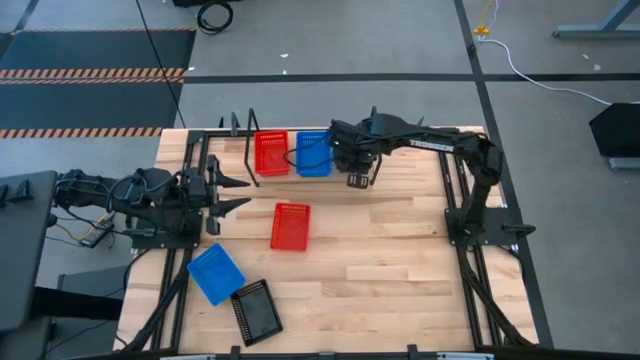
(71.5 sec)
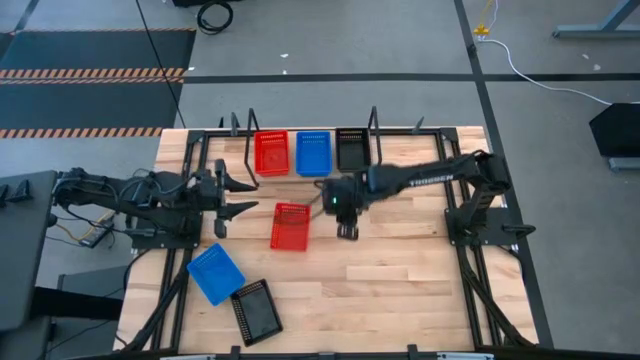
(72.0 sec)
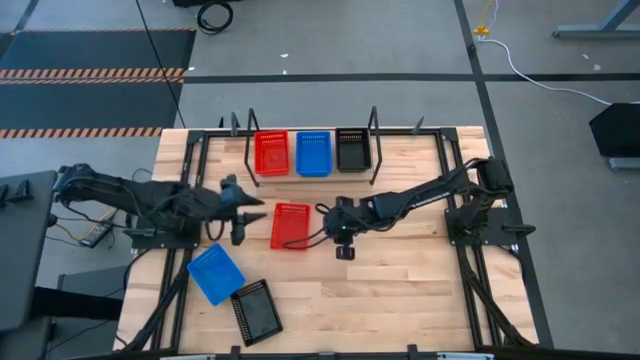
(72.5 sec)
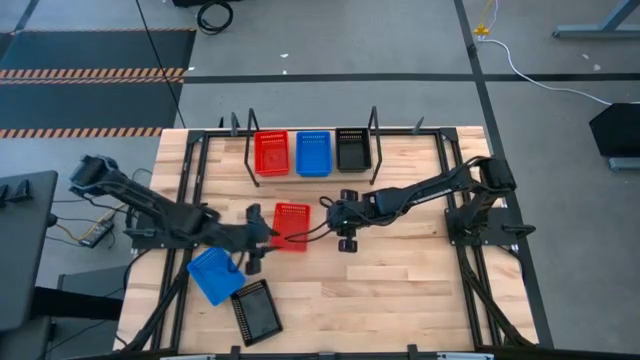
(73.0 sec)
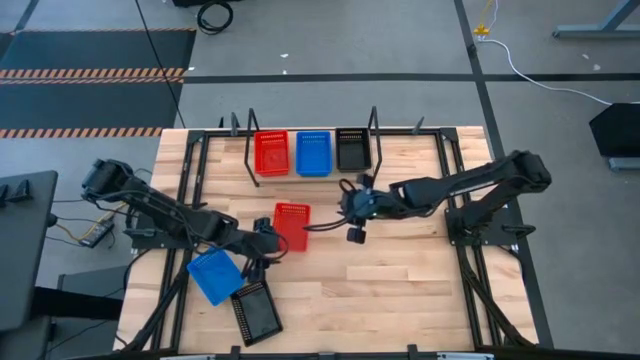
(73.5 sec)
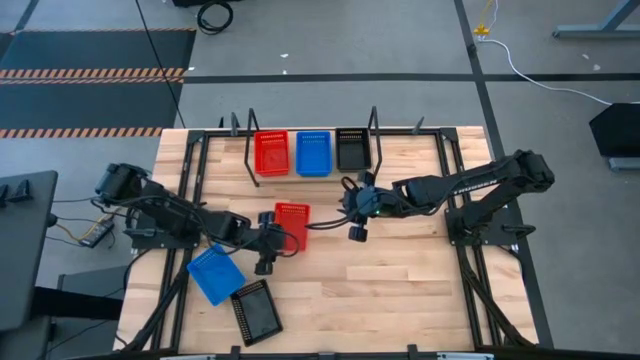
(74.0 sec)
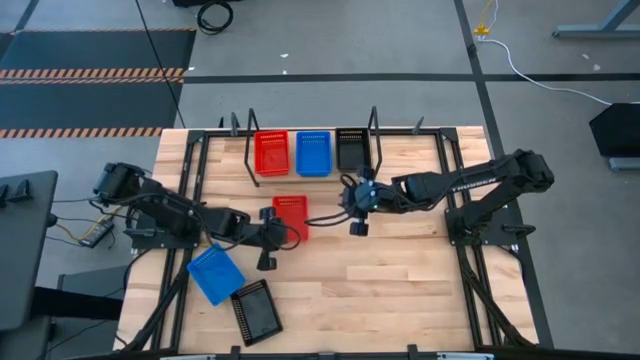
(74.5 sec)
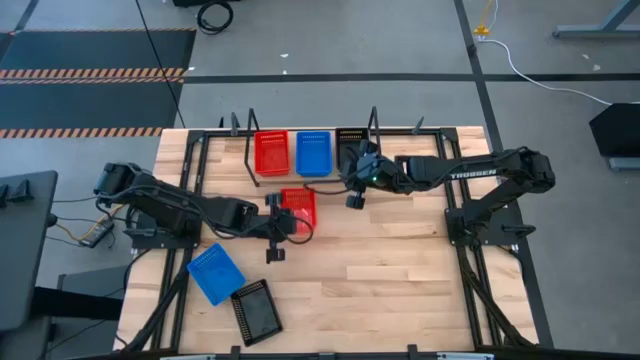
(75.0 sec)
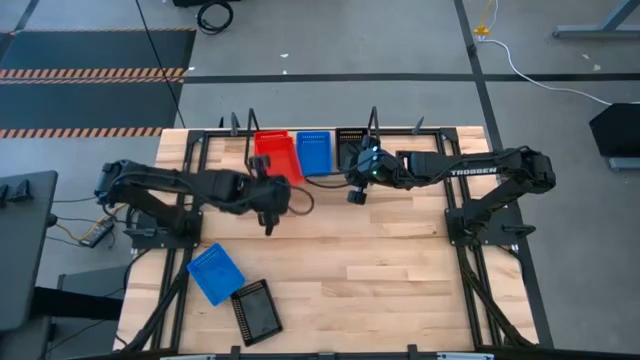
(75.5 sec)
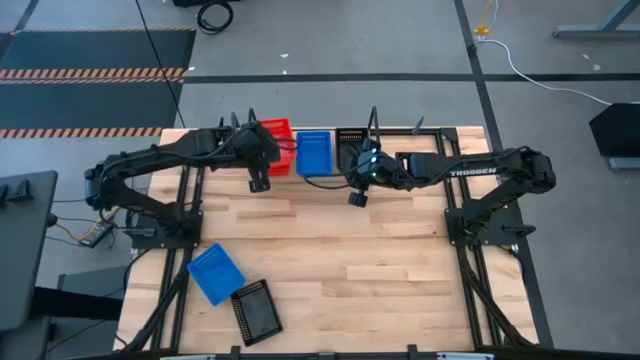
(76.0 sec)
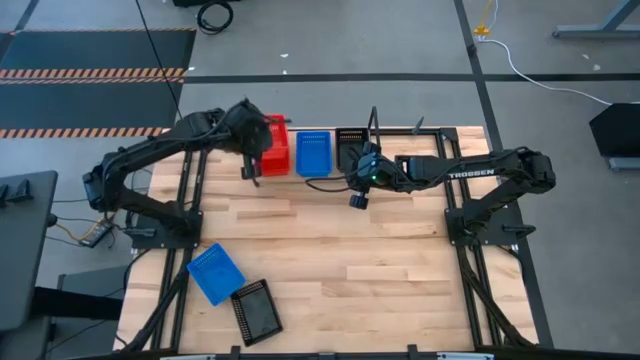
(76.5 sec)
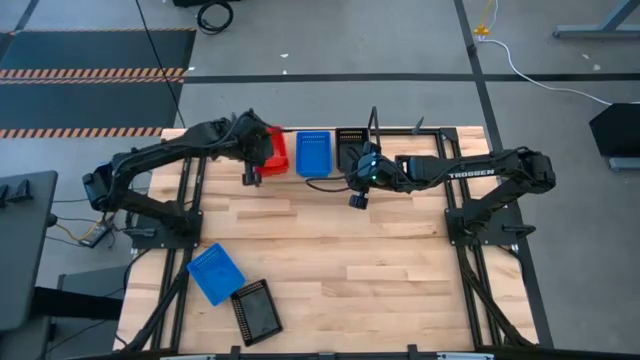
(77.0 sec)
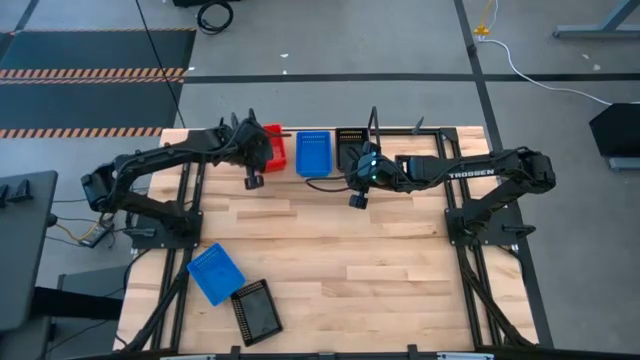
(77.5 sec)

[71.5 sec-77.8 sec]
Task: Stack baskets on shelf by color
Stack the red bin on top of the red bin on the shelf

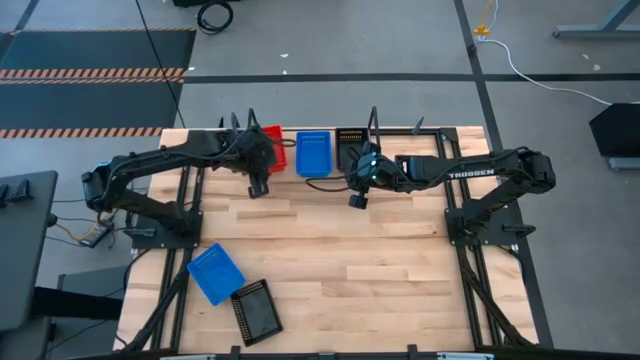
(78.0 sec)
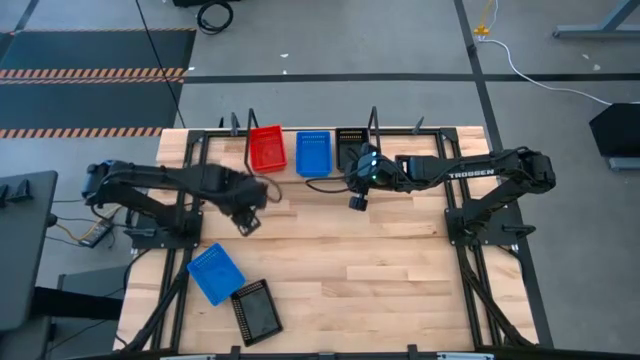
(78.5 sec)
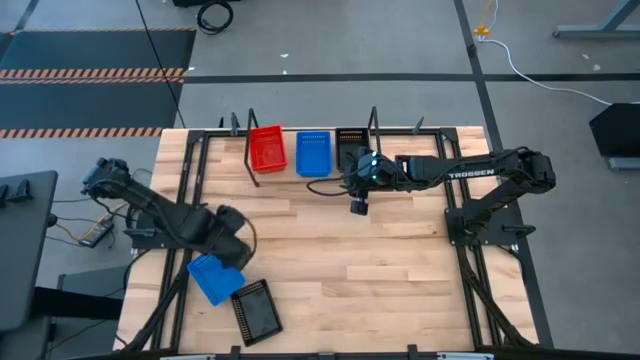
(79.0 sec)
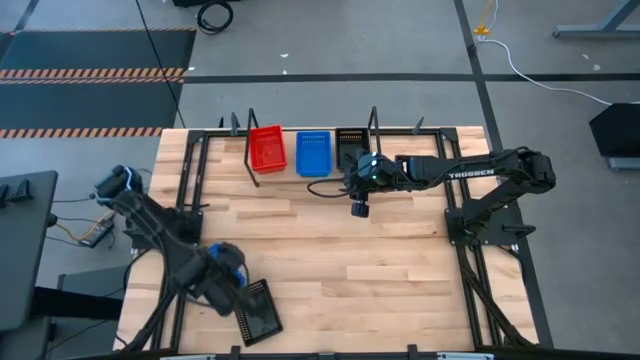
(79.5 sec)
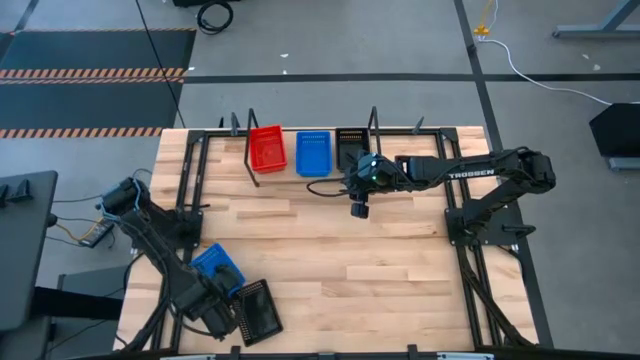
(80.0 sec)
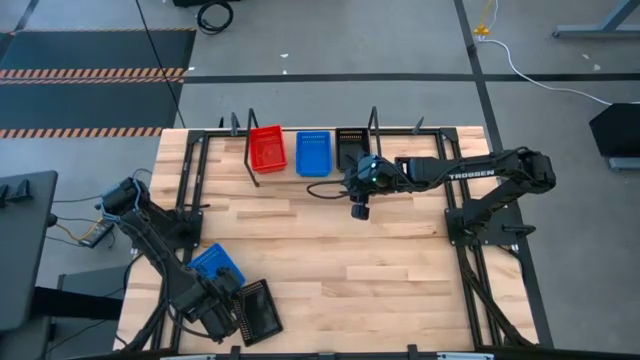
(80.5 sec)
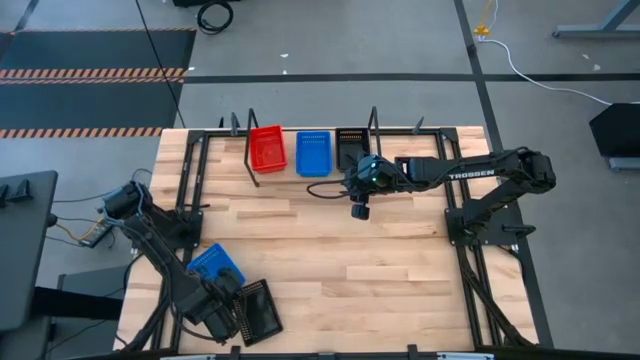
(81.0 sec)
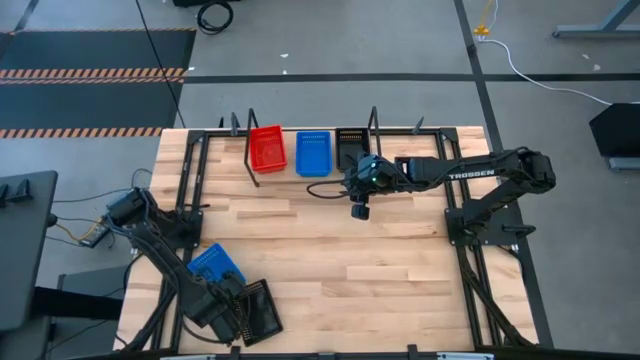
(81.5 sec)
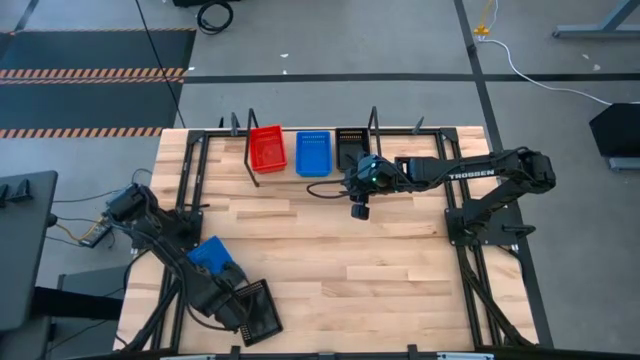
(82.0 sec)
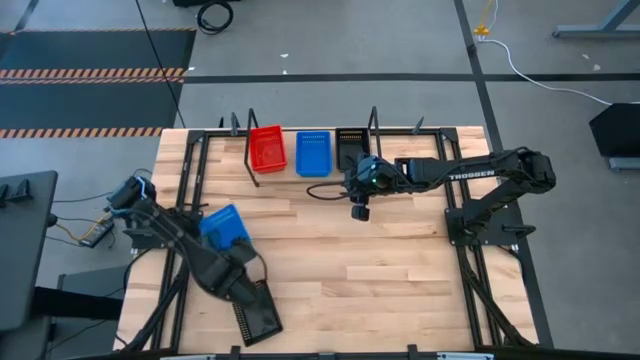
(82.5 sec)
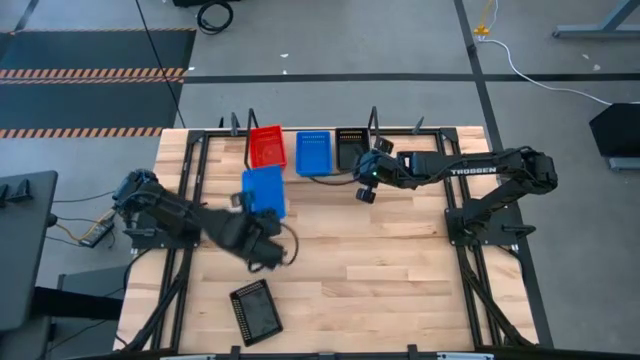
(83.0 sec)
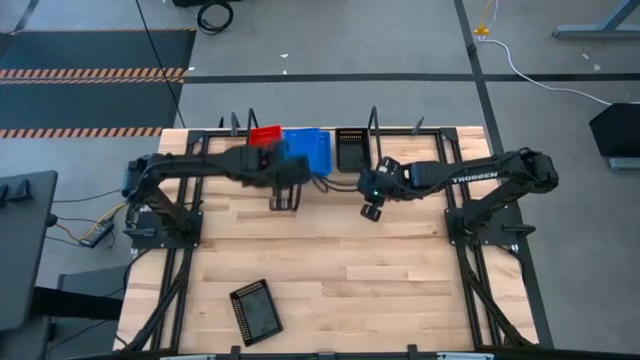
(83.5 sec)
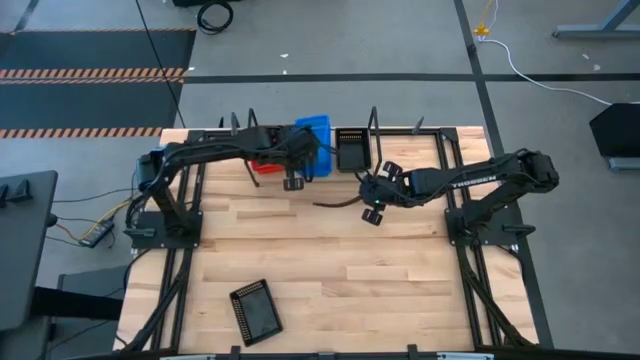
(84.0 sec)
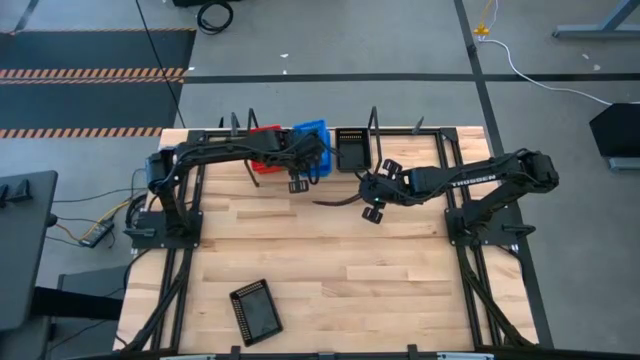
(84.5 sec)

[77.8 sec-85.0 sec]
Stack the blue bin on top of the blue bin on the shelf

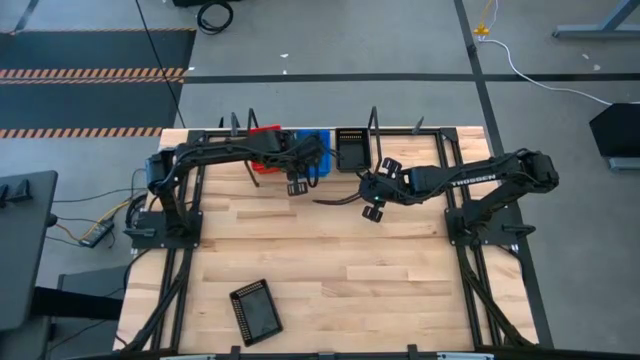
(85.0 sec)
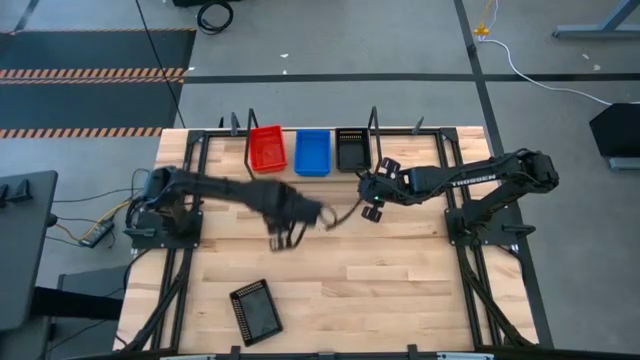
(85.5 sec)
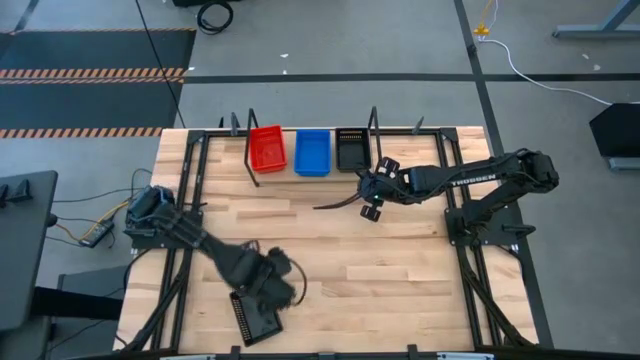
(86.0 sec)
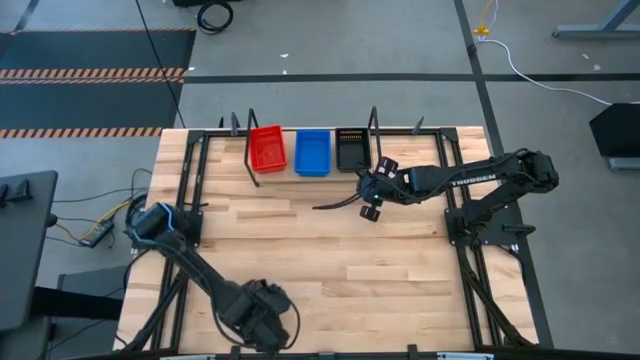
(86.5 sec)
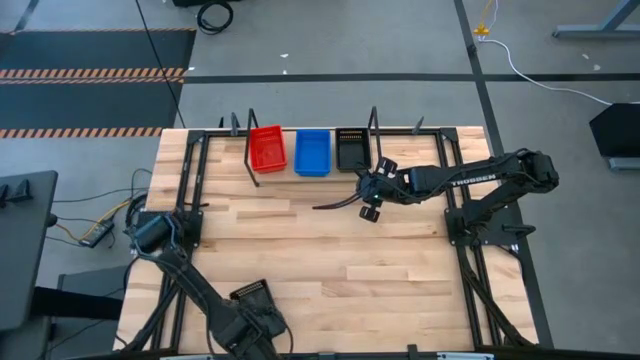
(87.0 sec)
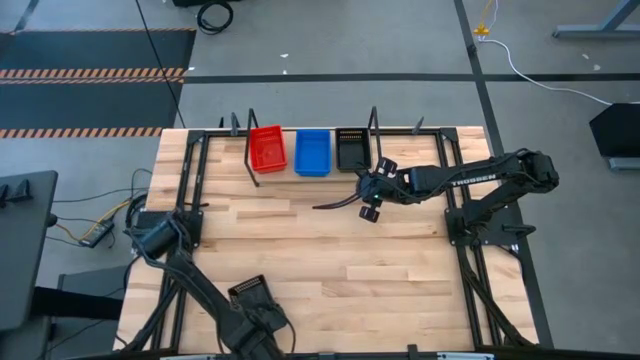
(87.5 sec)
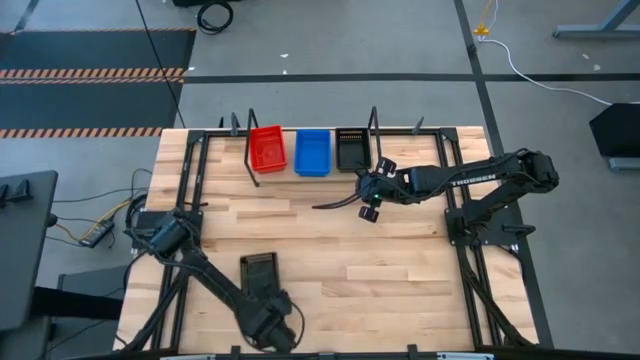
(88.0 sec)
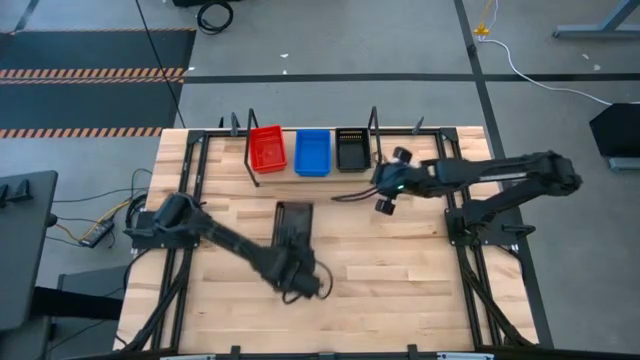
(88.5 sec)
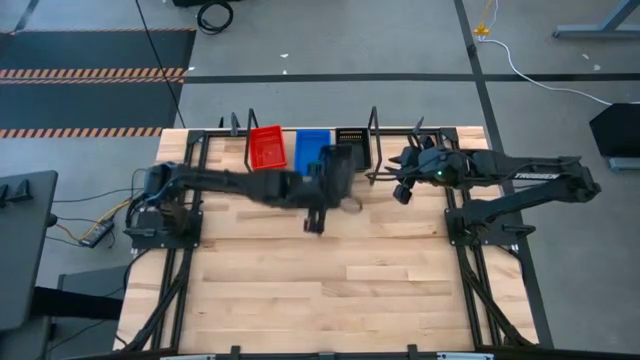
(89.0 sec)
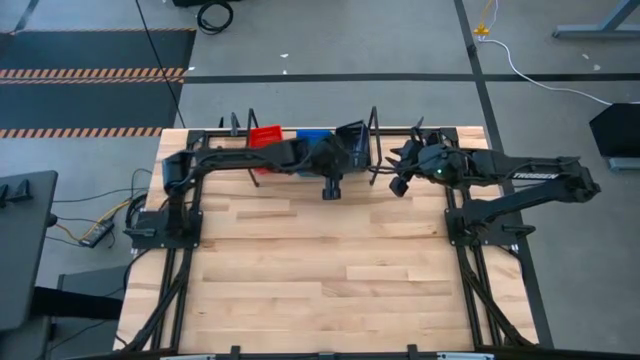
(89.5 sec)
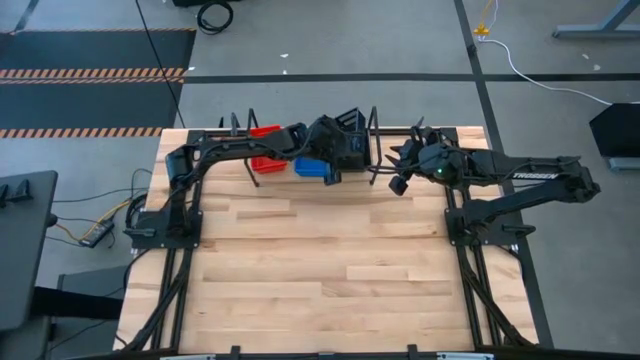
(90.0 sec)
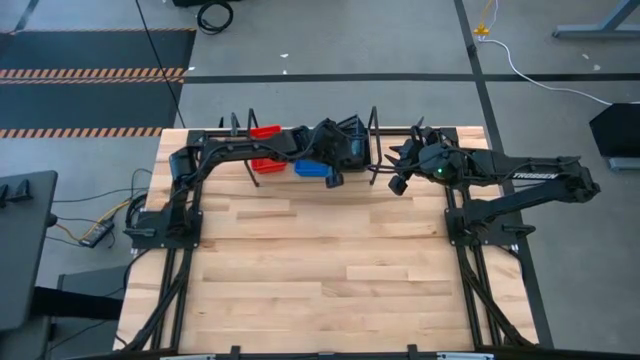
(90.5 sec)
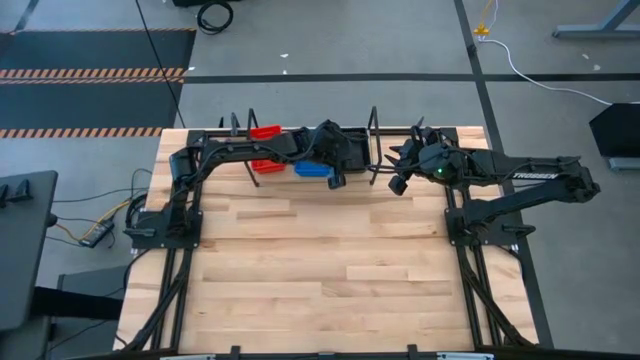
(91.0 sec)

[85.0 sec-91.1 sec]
Stack the black bin on top of the black bin on the shelf
